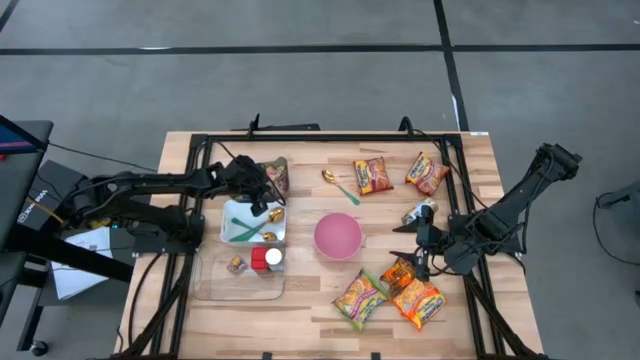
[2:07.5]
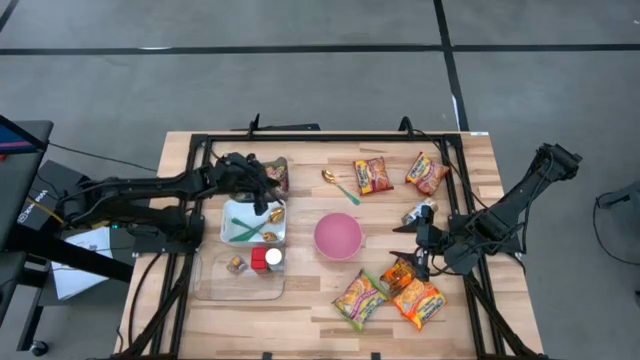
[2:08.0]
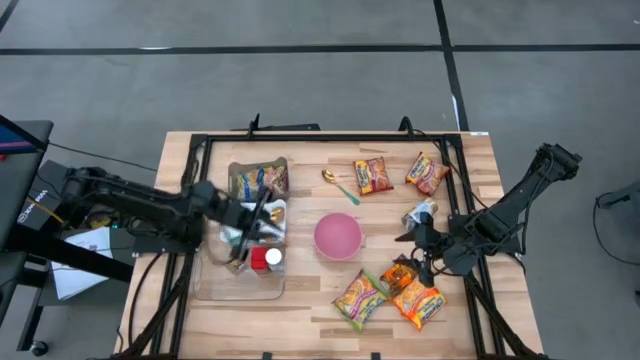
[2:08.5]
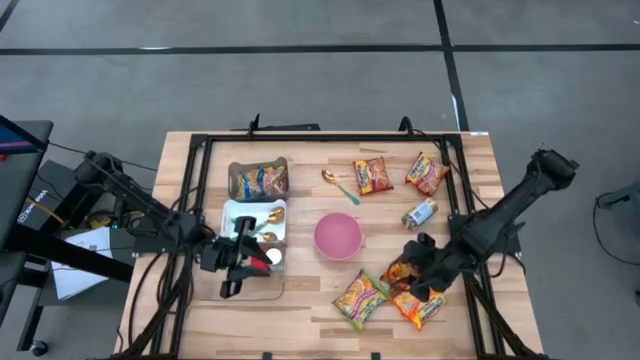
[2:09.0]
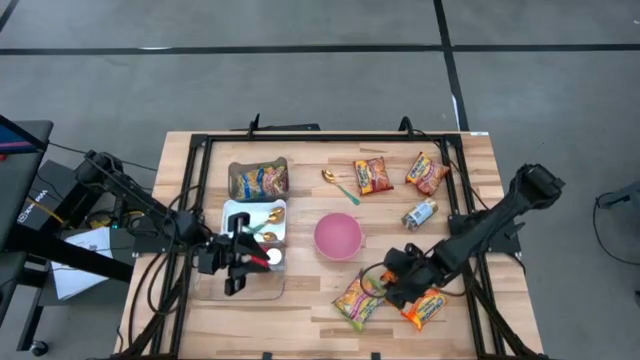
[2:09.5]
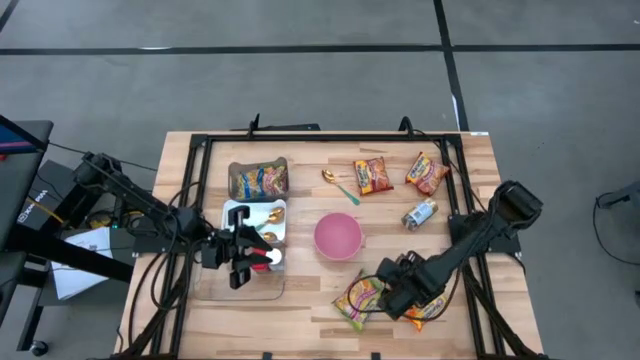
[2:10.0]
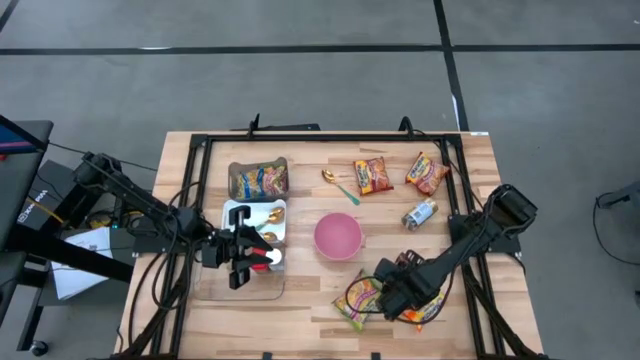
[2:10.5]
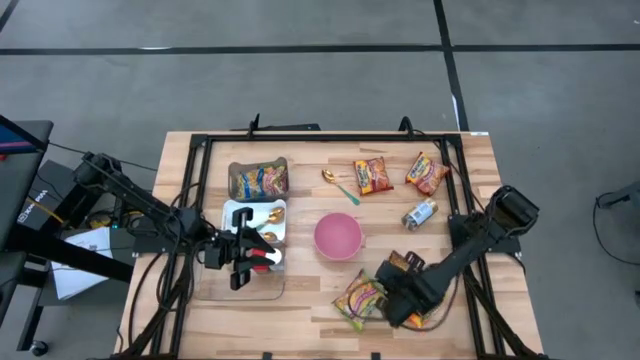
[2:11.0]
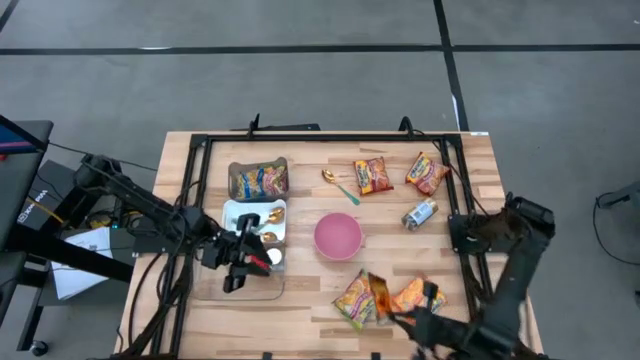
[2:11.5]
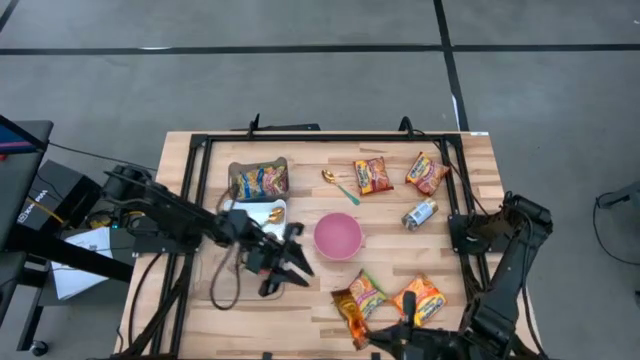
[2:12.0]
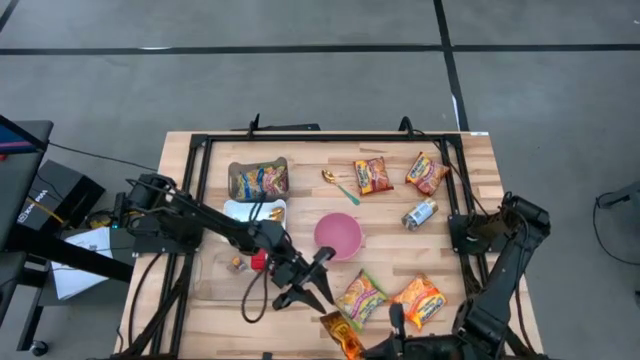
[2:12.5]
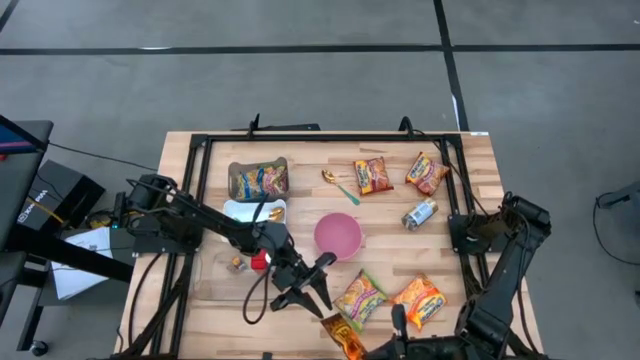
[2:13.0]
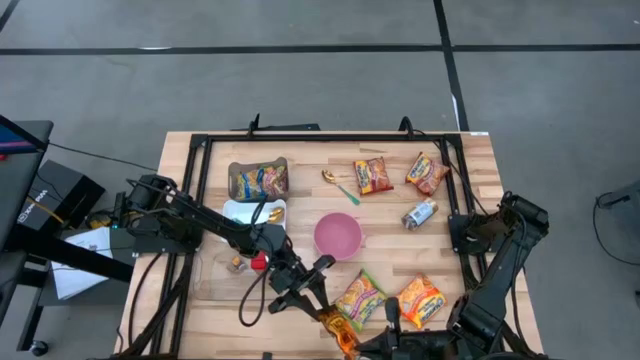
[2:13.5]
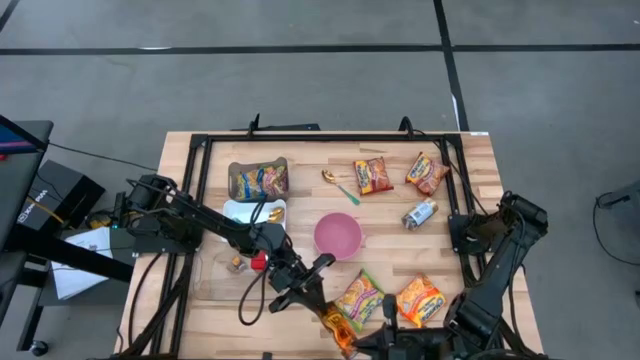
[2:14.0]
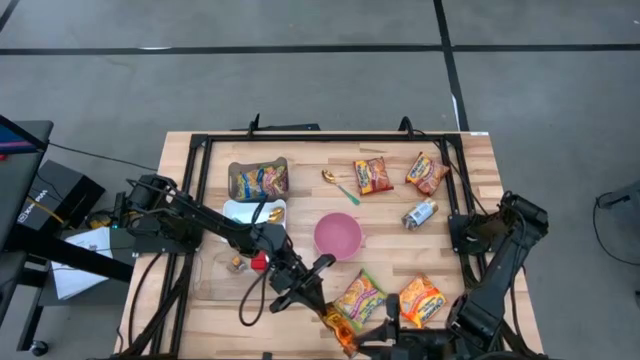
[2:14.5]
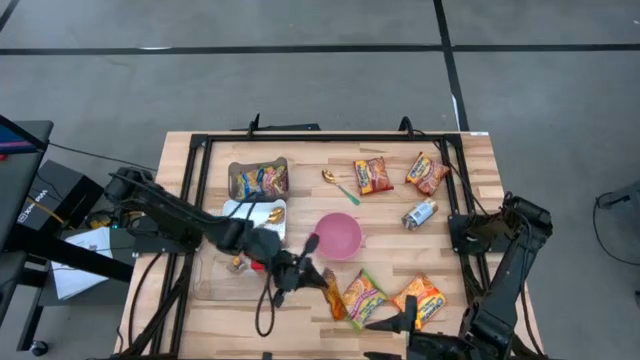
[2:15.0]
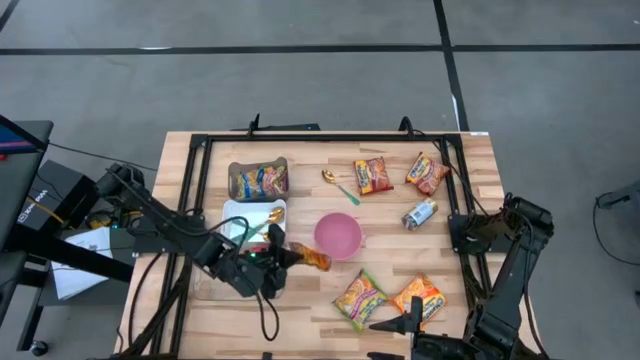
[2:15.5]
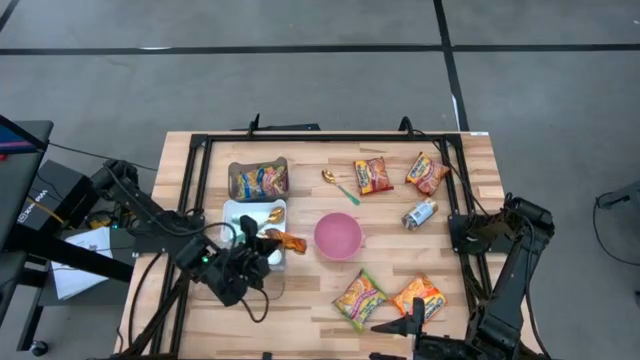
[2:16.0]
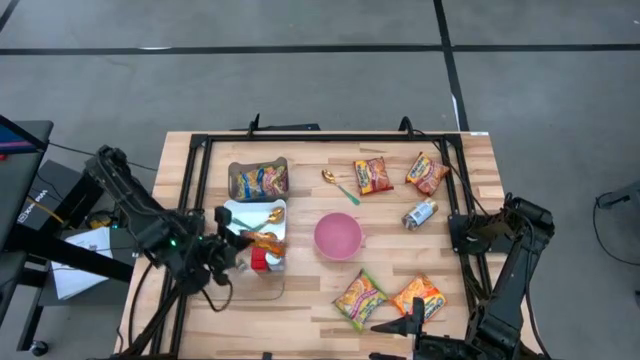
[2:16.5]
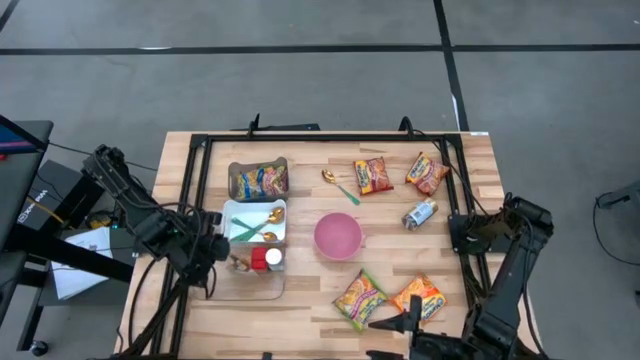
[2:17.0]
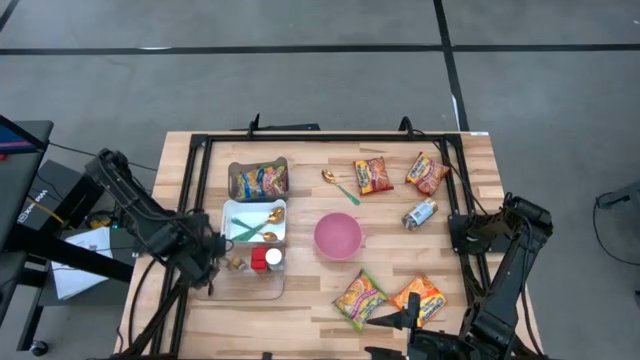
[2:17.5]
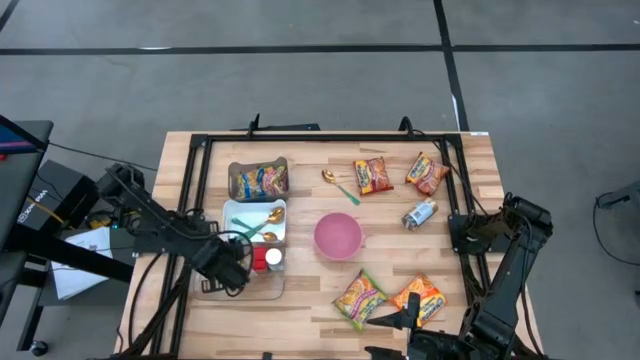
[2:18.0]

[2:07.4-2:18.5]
Task: Pick & Place Food Item
Put the orange spice pack into the transparent bin

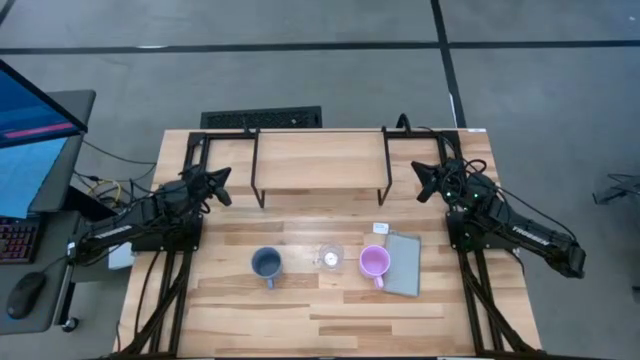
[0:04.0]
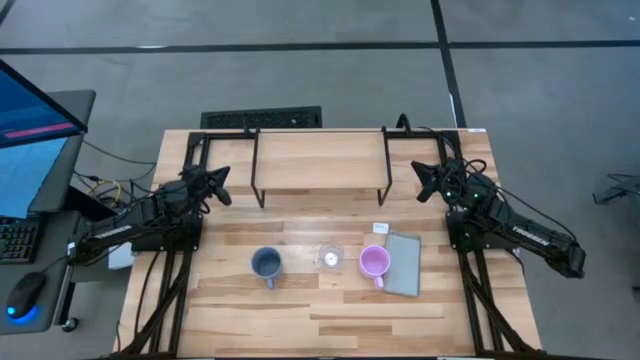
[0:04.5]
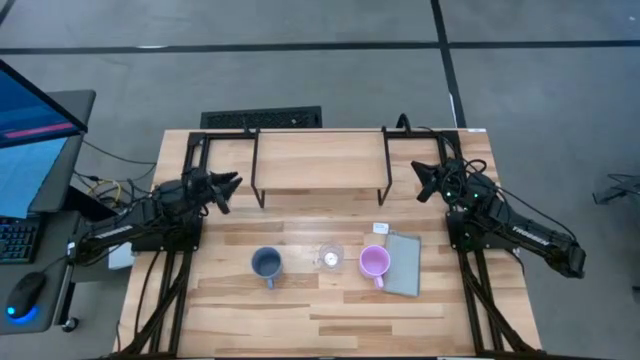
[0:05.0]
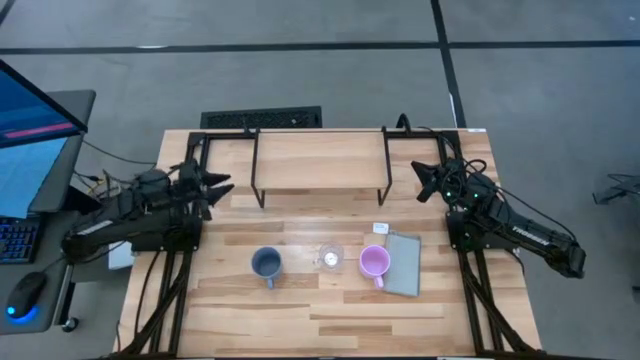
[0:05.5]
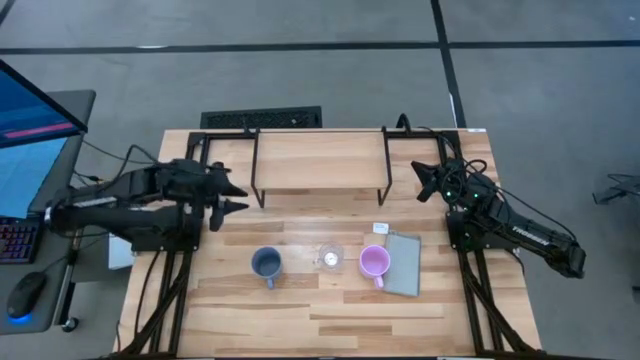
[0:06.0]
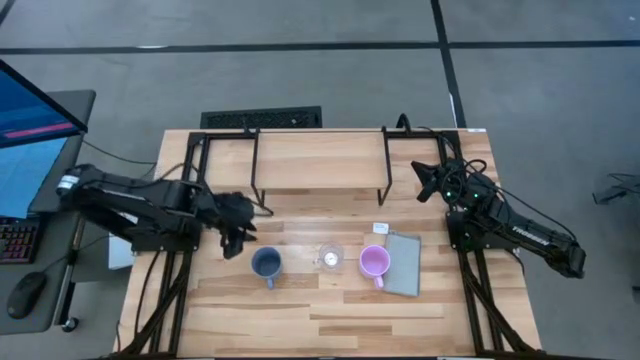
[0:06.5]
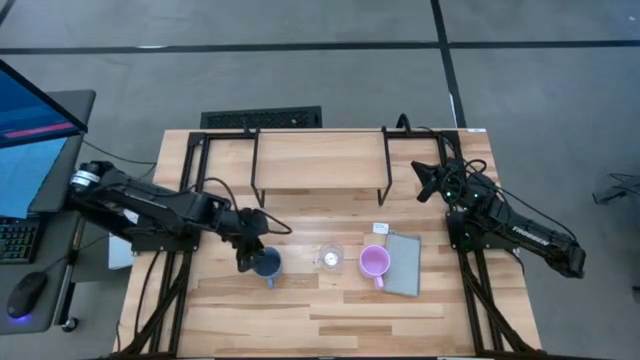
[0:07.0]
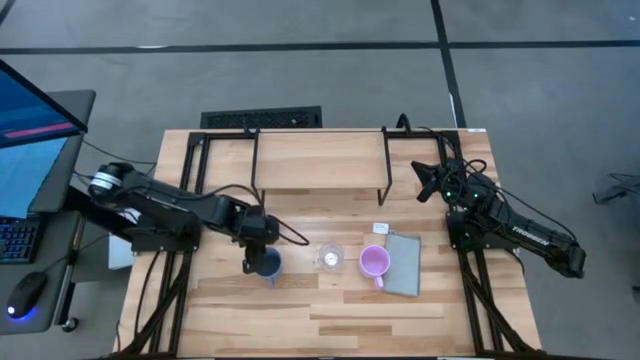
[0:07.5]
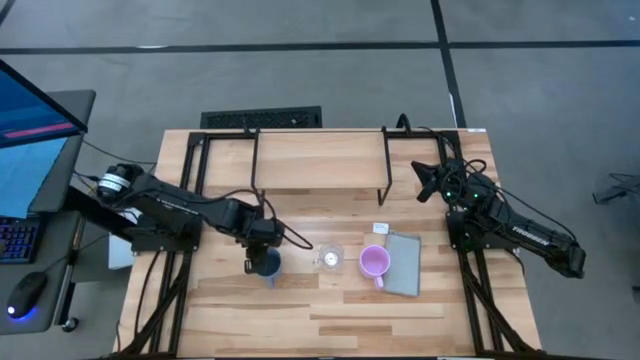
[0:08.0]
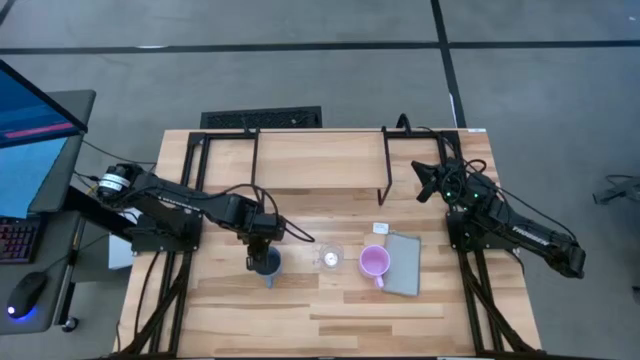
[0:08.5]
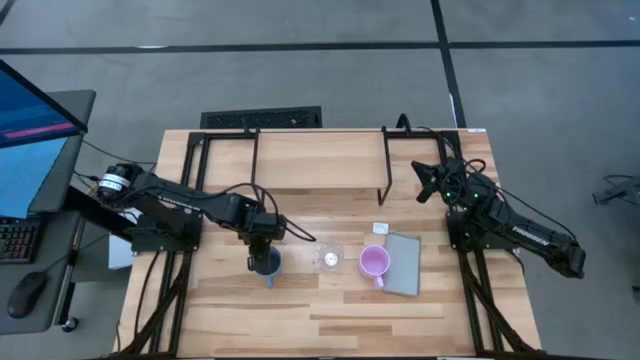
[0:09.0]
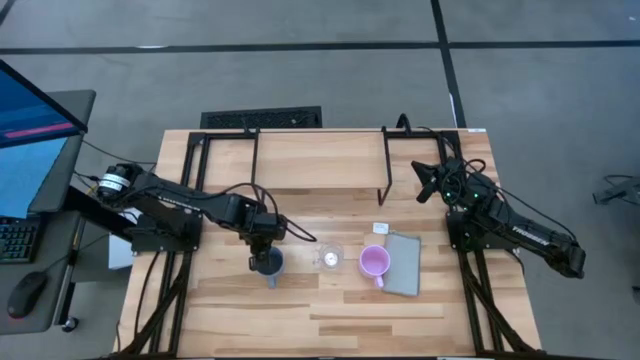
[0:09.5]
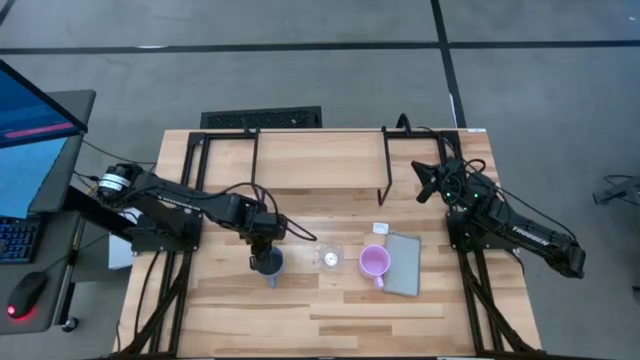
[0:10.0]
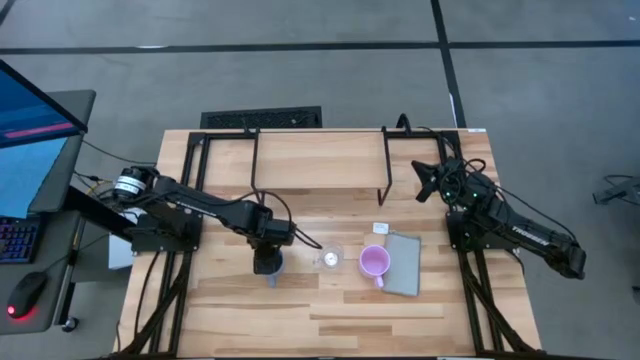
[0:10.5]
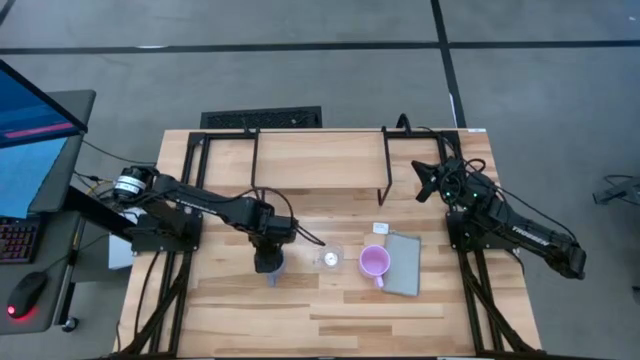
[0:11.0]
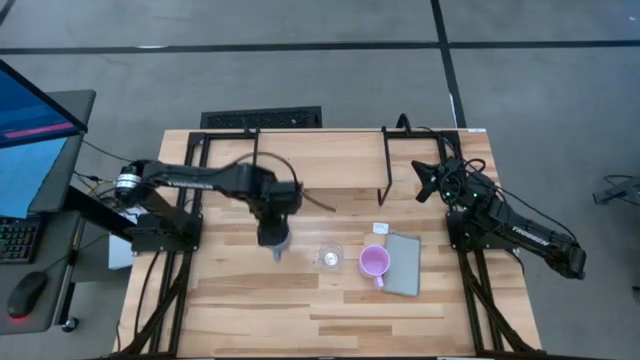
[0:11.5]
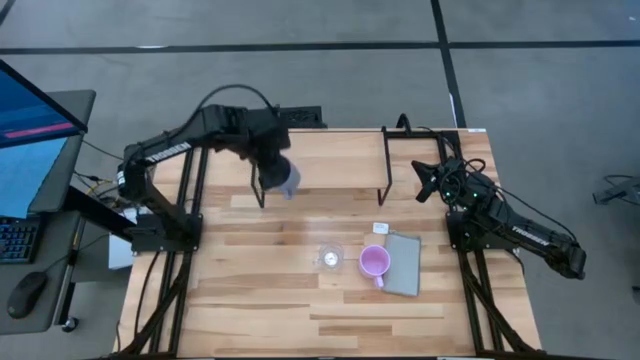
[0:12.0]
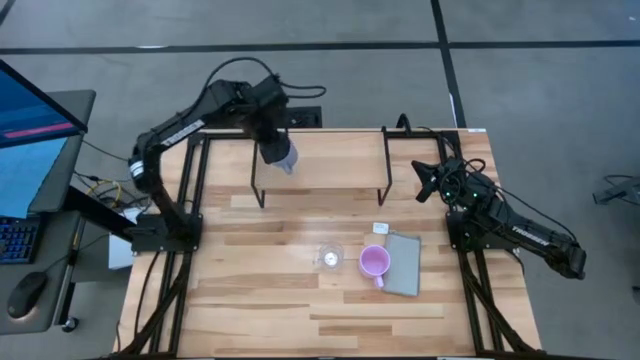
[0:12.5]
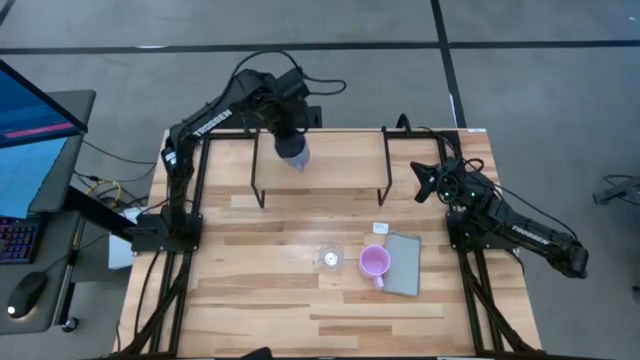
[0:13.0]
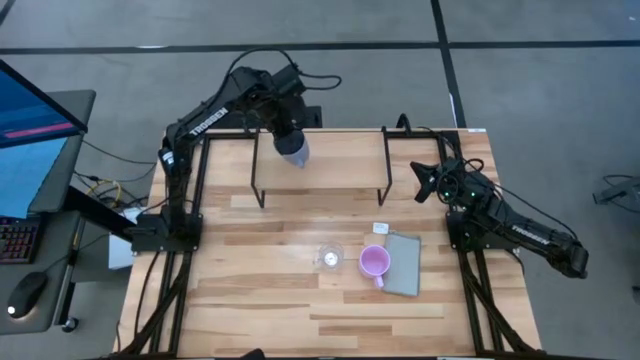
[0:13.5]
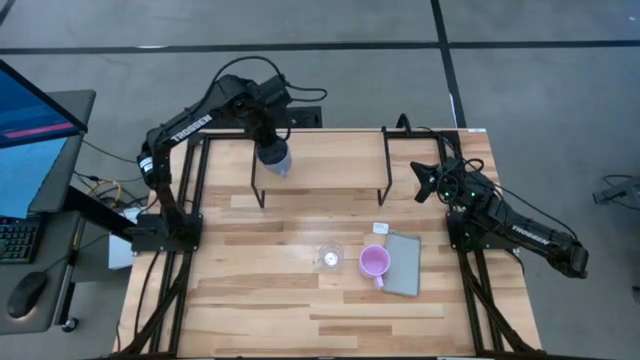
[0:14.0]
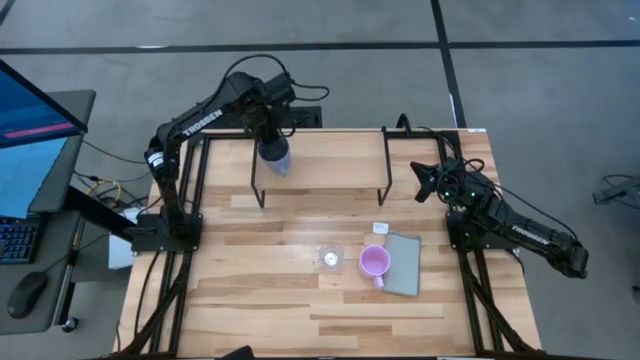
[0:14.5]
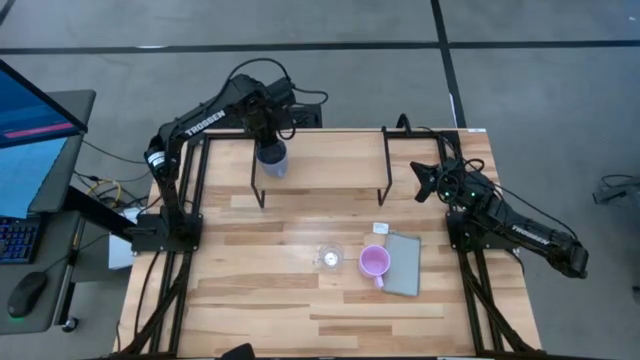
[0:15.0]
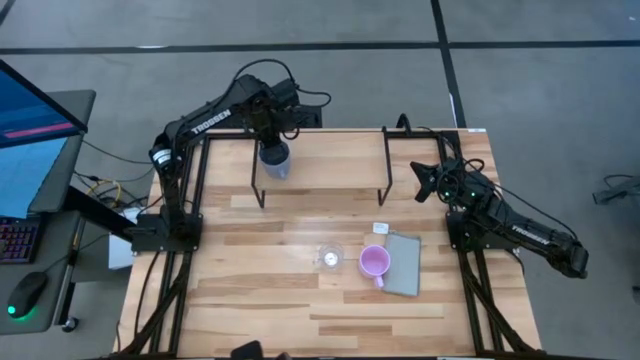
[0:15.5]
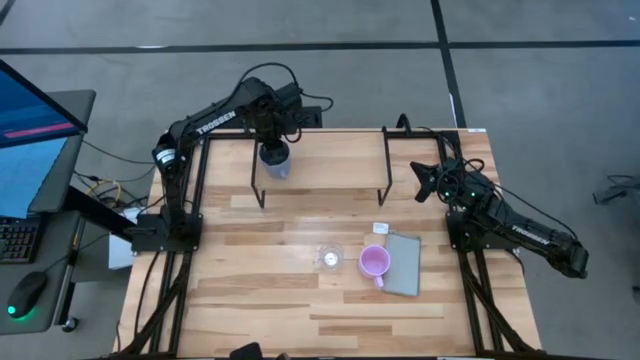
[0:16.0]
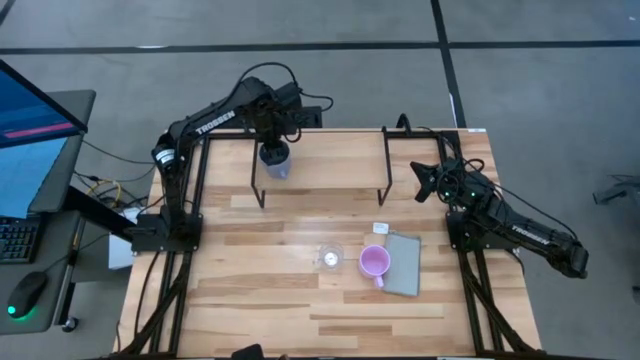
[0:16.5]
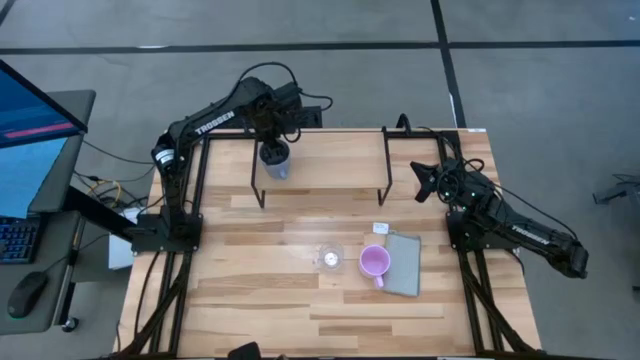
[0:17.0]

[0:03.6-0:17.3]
Task: Stack small to large cups/mugs on shelf
Put the blue cup on the shelf
